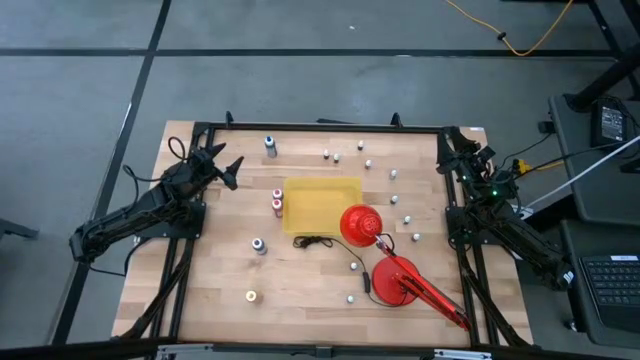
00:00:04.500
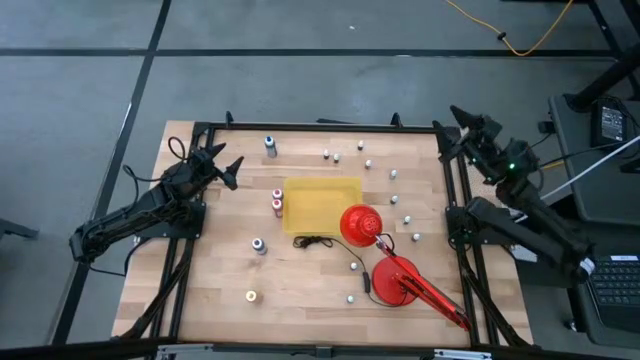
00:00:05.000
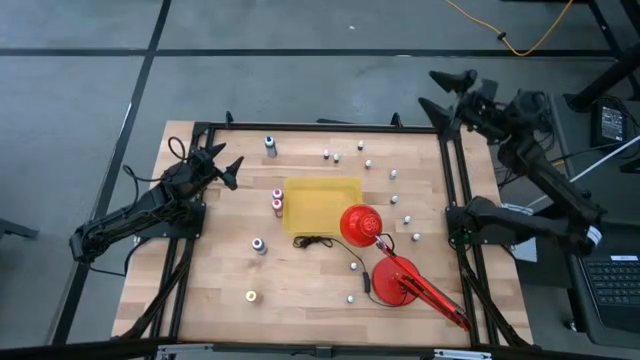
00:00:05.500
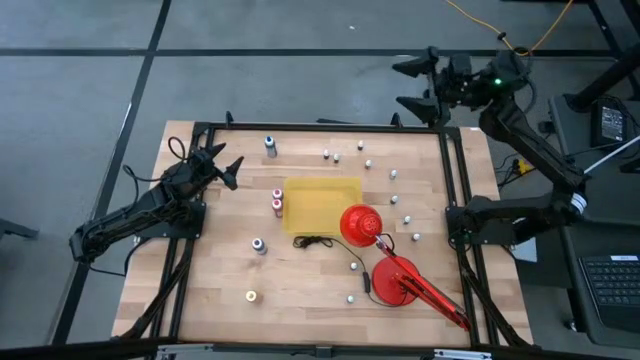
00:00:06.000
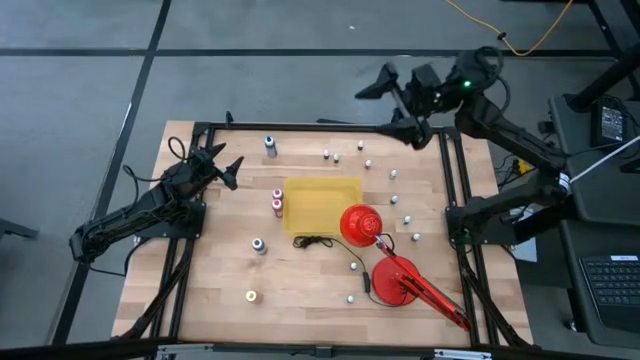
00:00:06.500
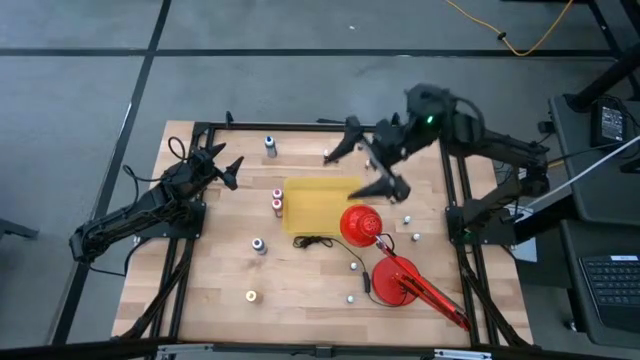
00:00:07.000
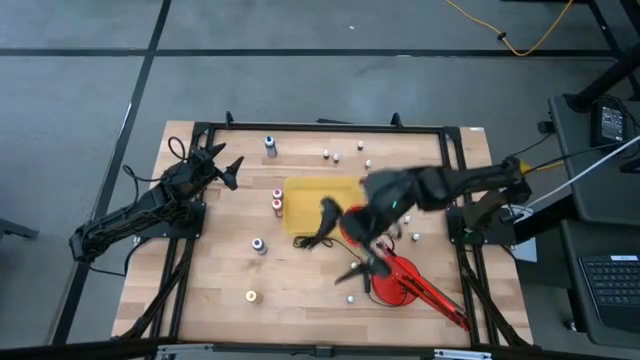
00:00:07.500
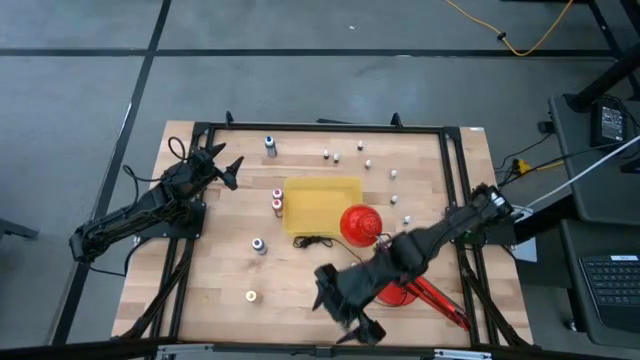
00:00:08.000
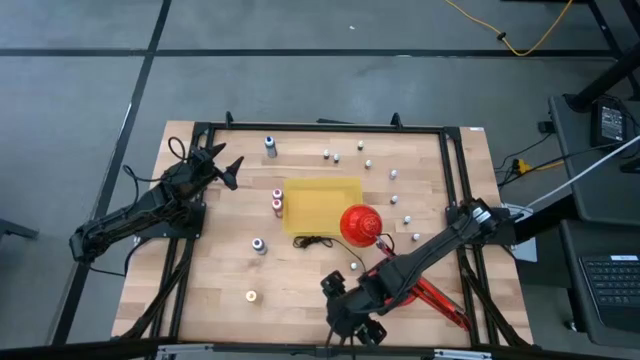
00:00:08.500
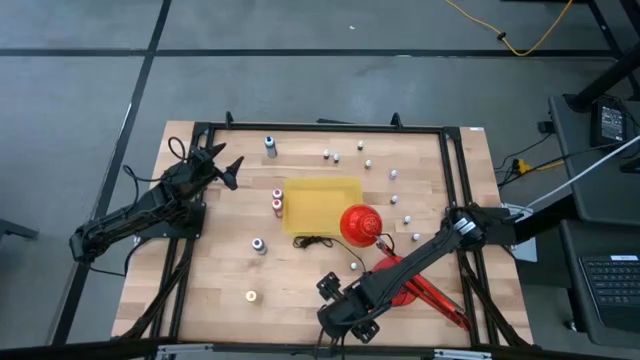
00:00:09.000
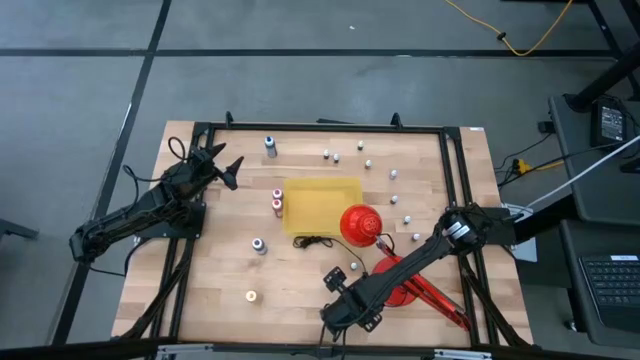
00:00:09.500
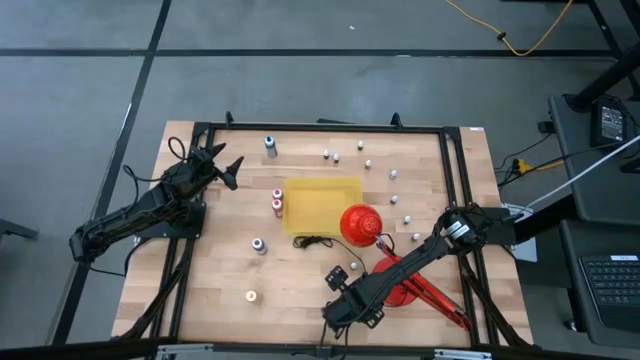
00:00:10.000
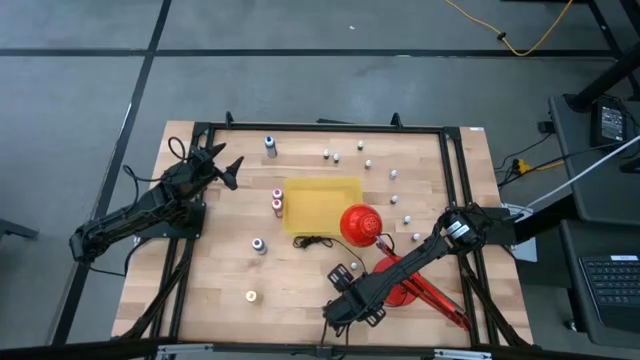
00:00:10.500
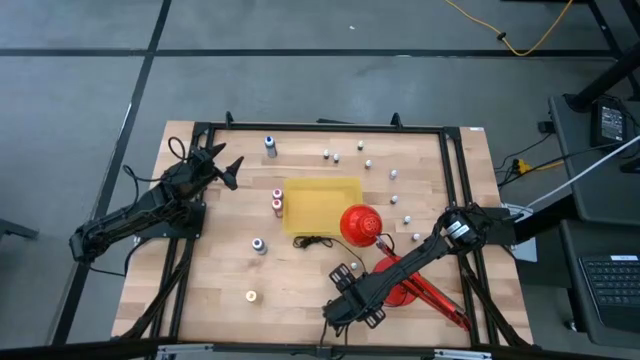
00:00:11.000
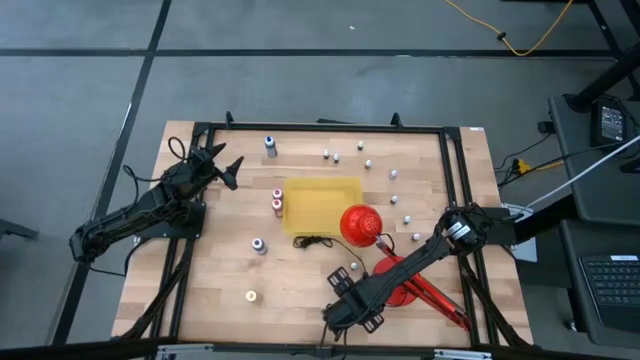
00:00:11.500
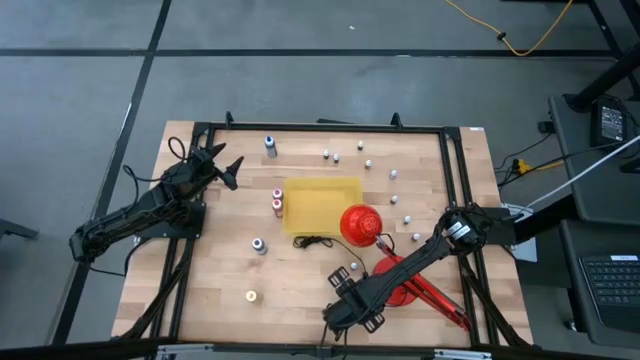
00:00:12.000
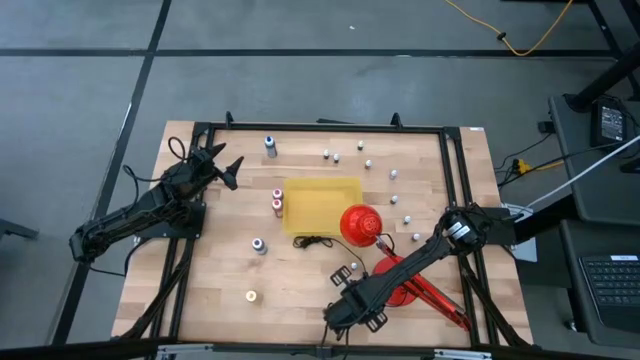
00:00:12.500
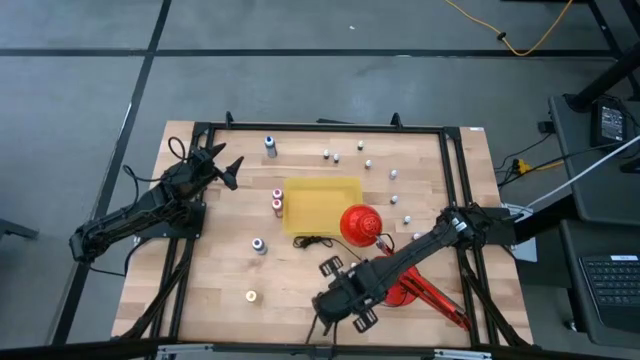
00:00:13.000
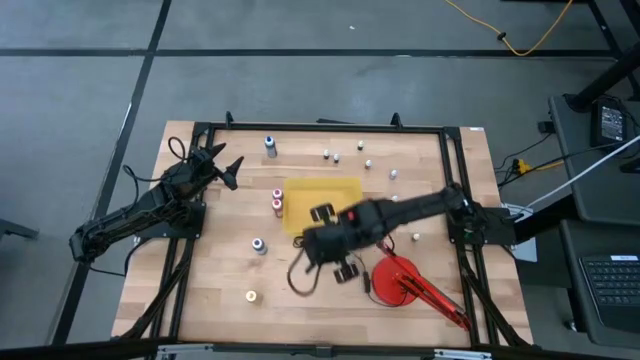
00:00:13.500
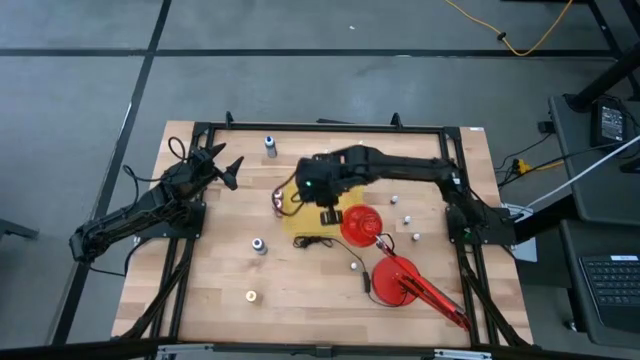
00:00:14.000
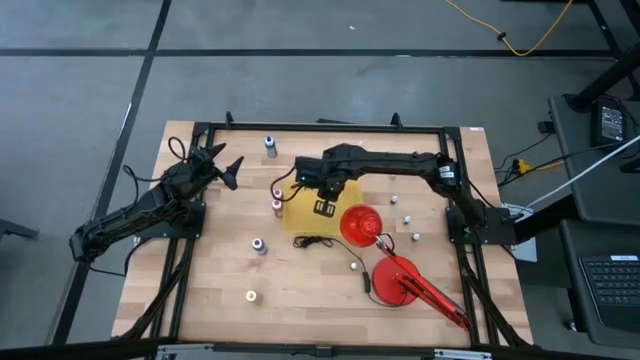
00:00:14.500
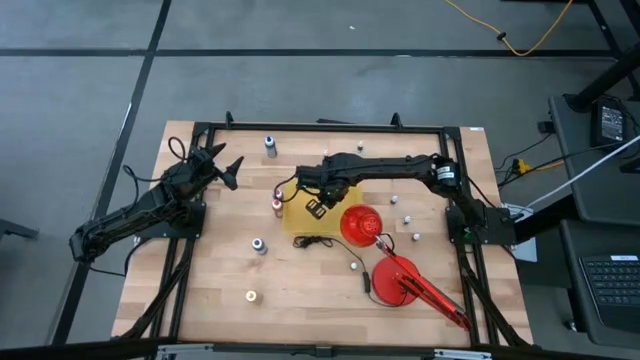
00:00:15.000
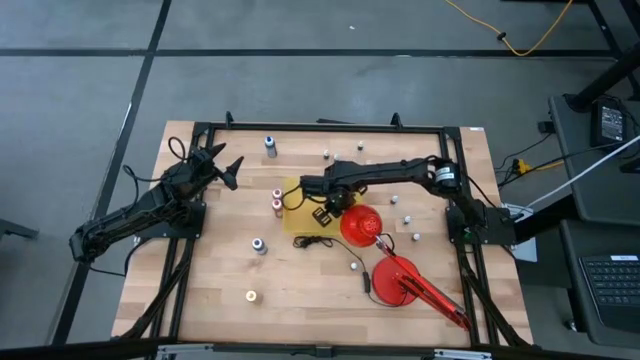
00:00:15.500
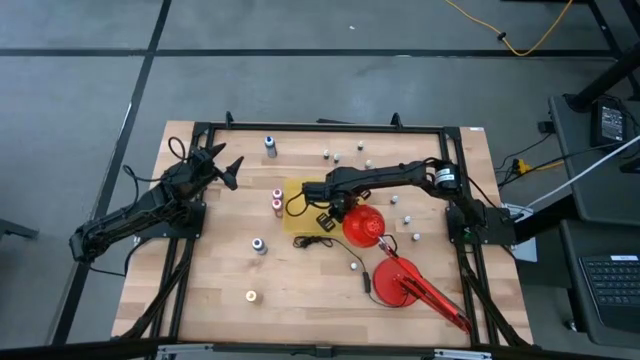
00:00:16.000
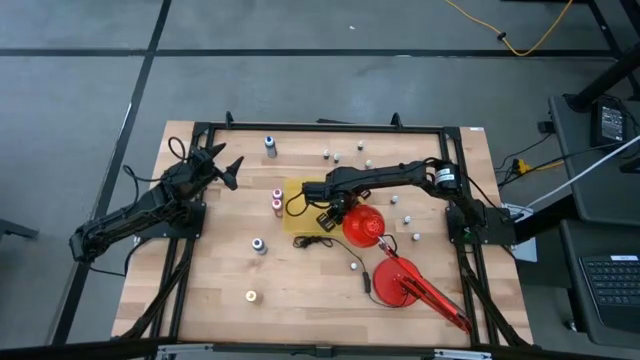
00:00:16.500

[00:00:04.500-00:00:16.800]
Task: Pick & Place food coloring
Put the bottom small red food coloring bottle into the yellow container

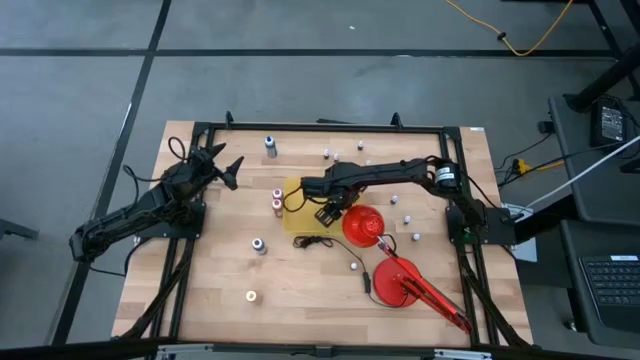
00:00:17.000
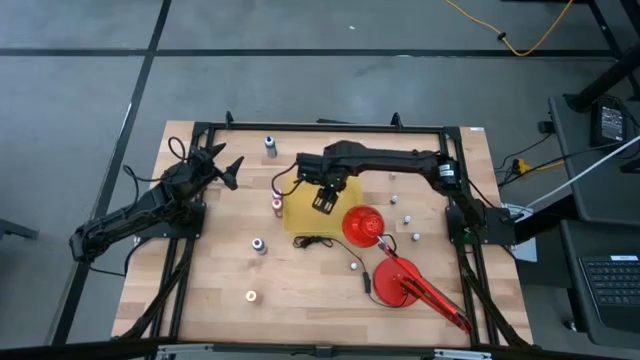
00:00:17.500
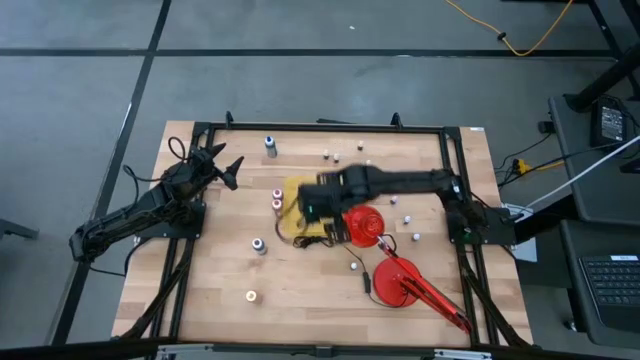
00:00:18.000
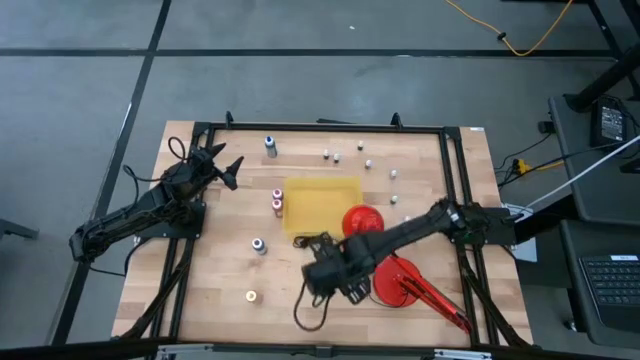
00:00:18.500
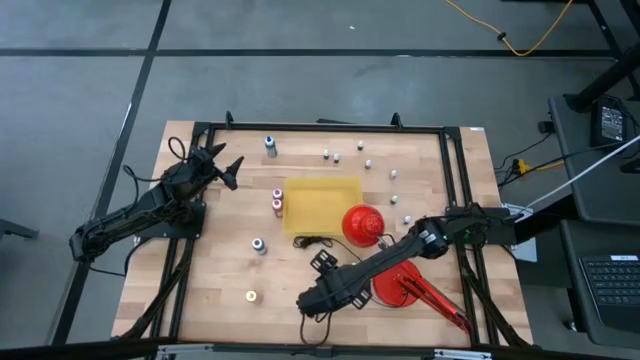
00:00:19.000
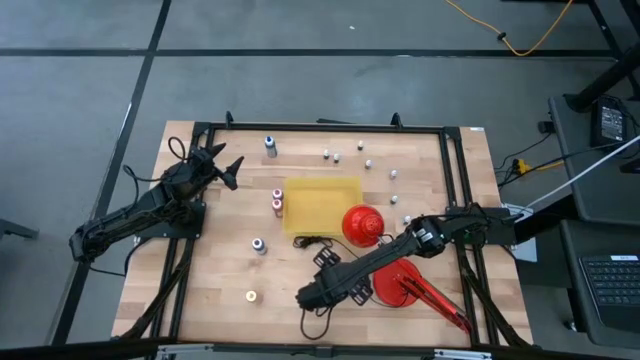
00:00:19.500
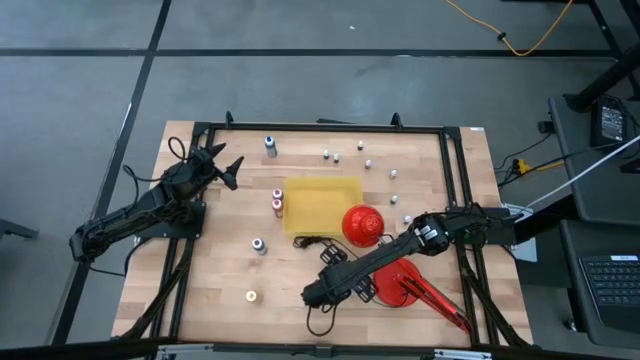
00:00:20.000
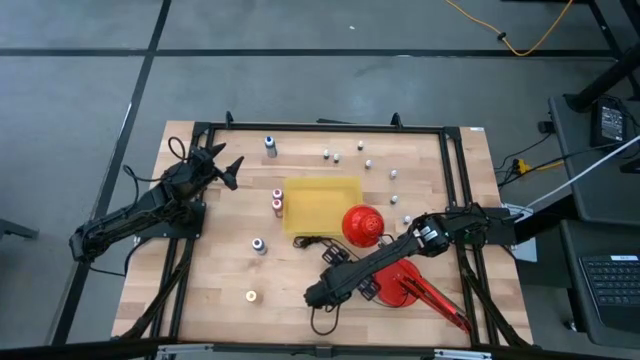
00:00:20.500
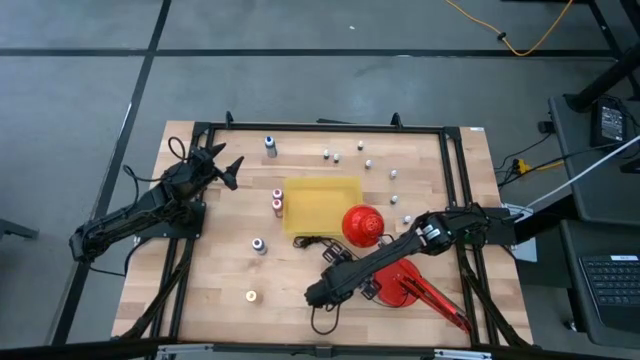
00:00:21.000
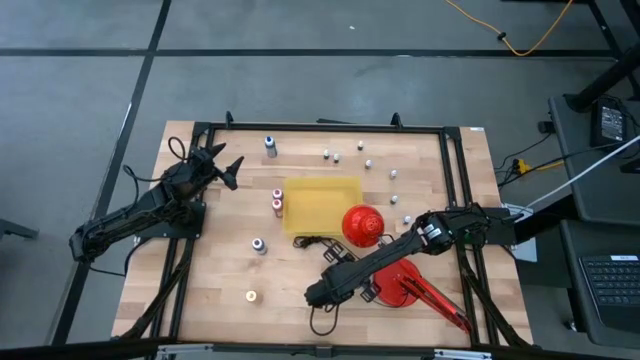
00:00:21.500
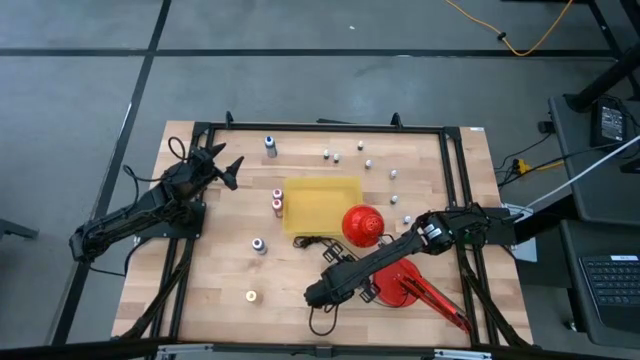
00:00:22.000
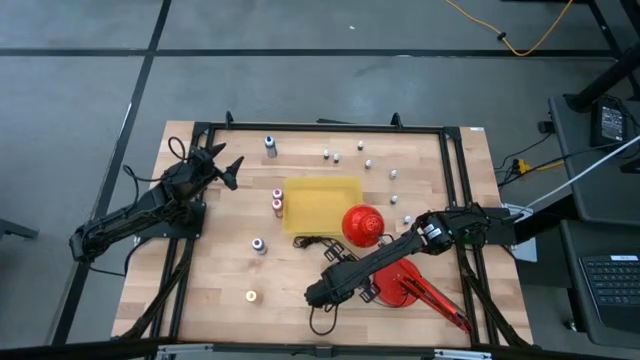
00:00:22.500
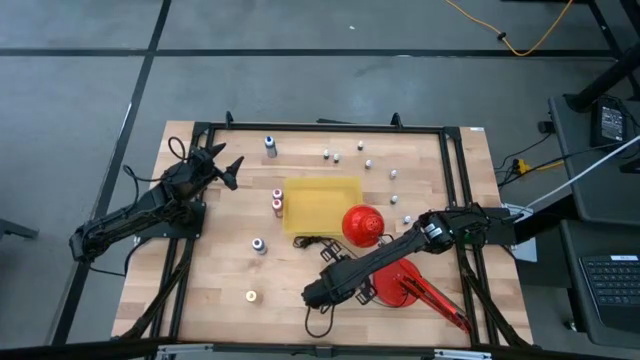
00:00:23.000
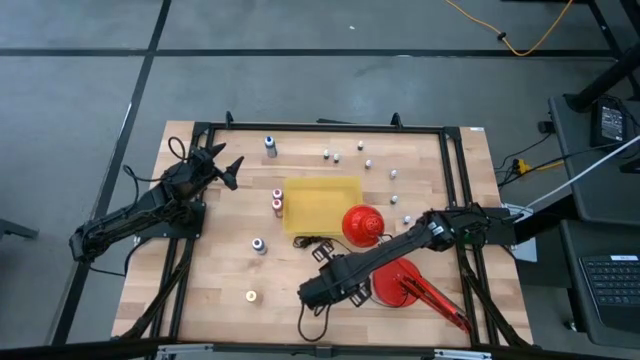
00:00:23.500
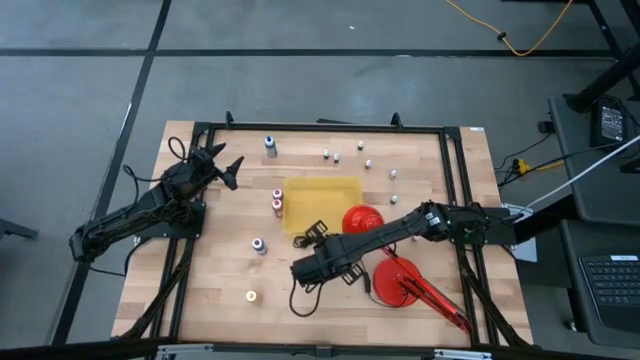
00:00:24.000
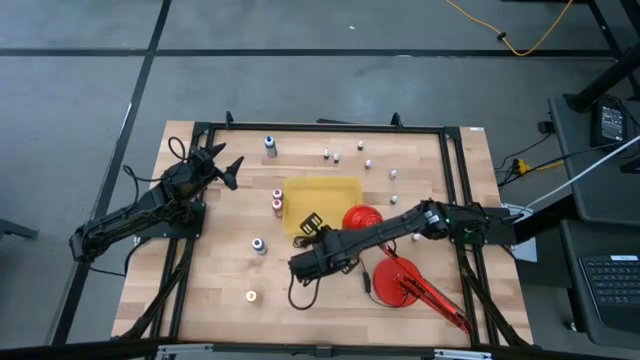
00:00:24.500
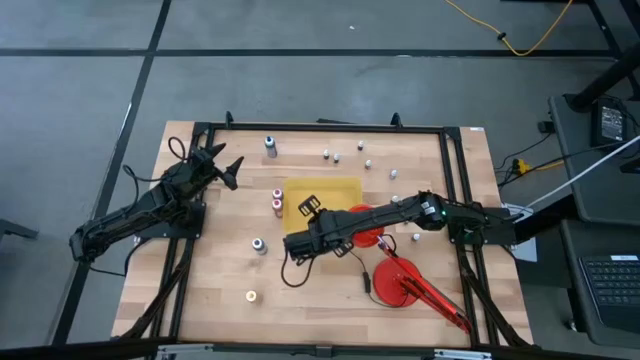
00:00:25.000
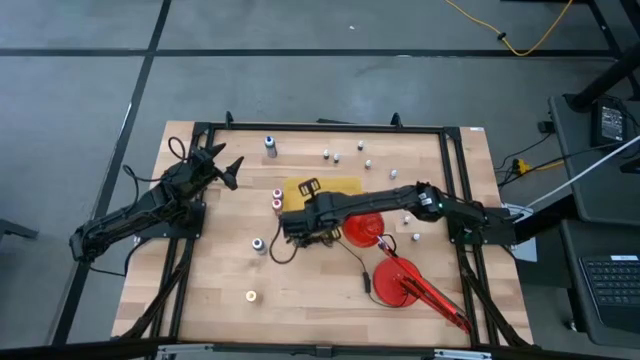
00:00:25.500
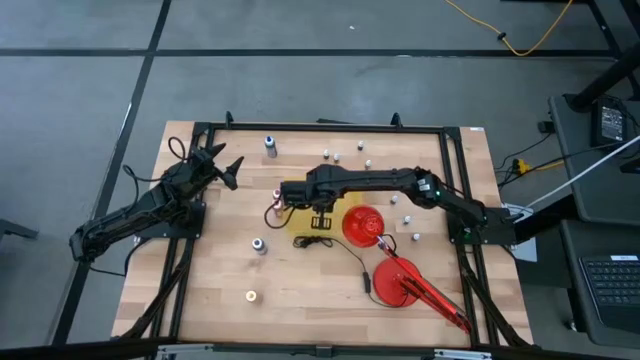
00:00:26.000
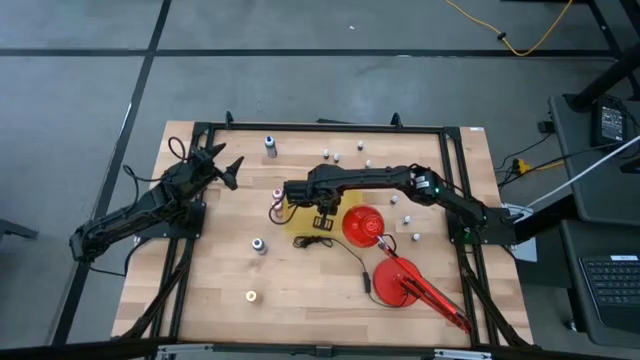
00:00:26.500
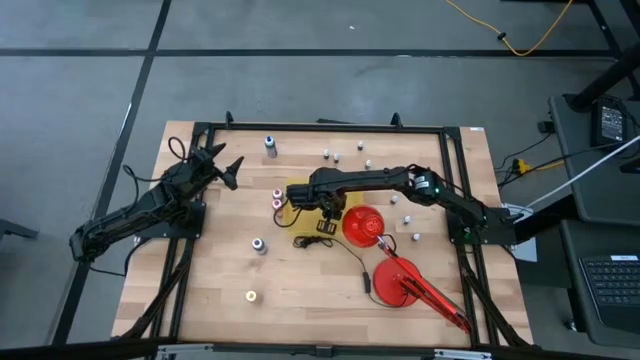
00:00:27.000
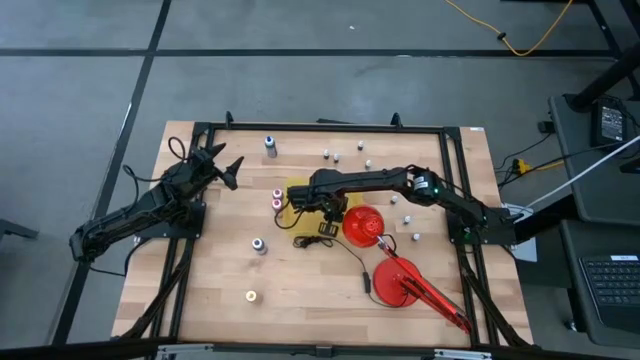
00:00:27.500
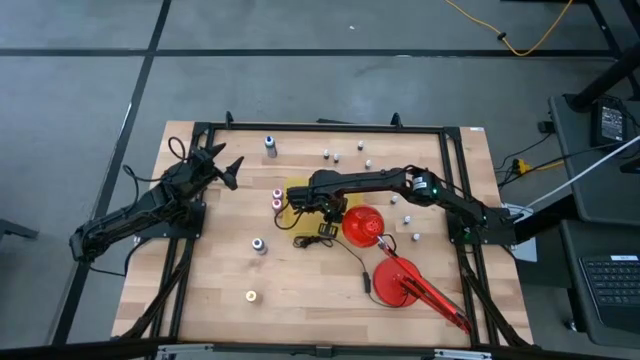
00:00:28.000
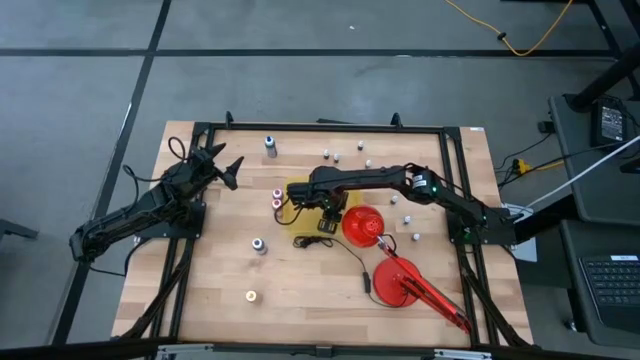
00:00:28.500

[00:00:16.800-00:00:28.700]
Put the bottom small brown food coloring bottle into the yellow container
